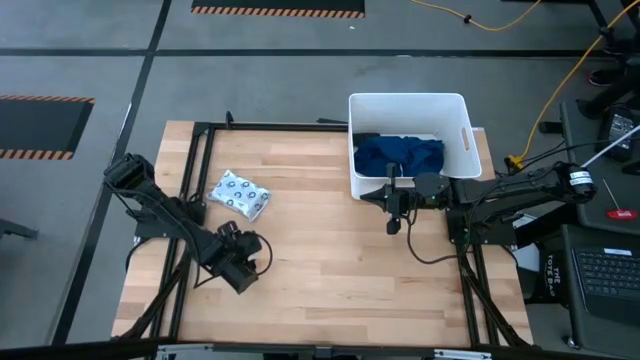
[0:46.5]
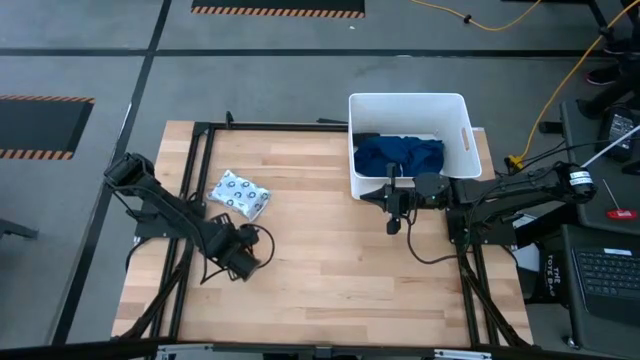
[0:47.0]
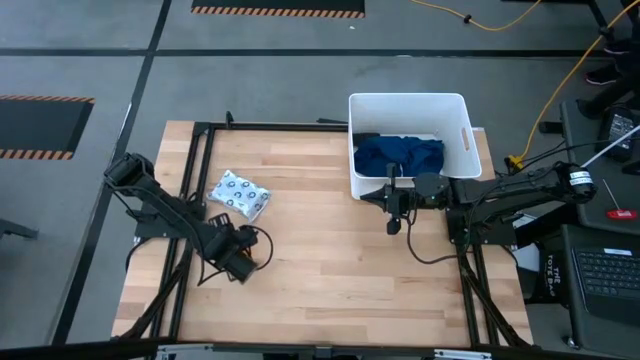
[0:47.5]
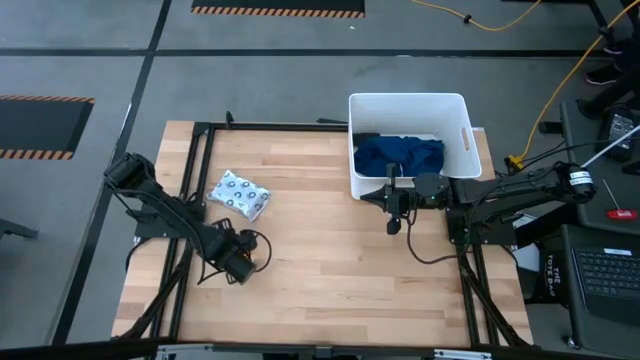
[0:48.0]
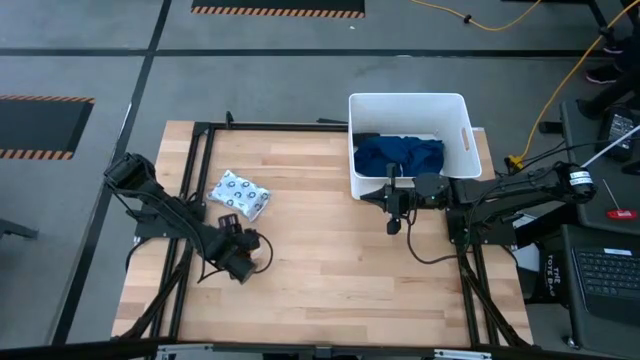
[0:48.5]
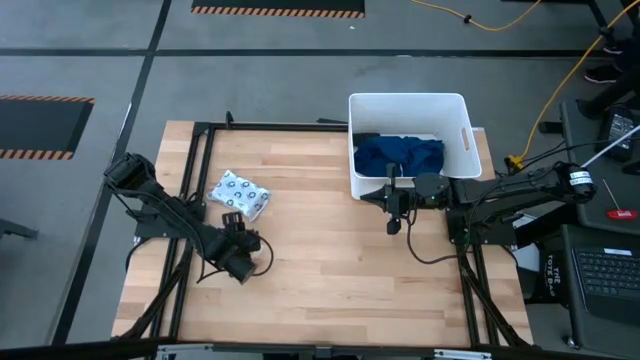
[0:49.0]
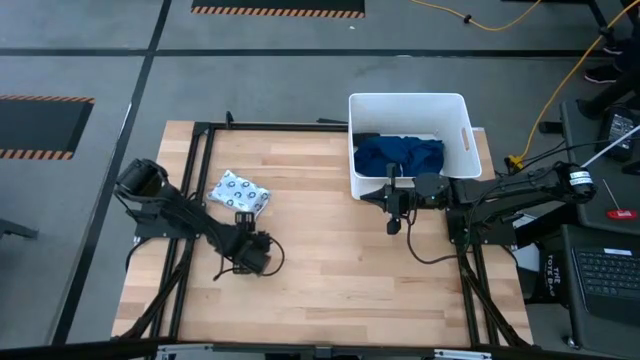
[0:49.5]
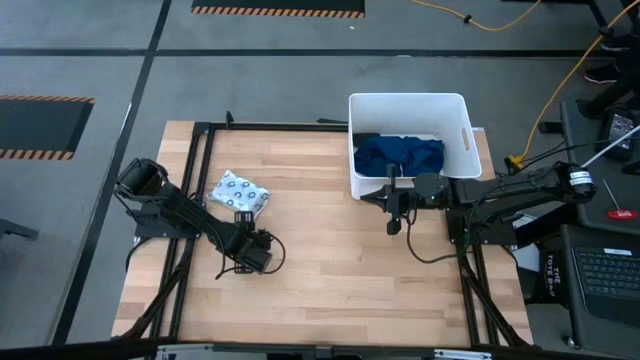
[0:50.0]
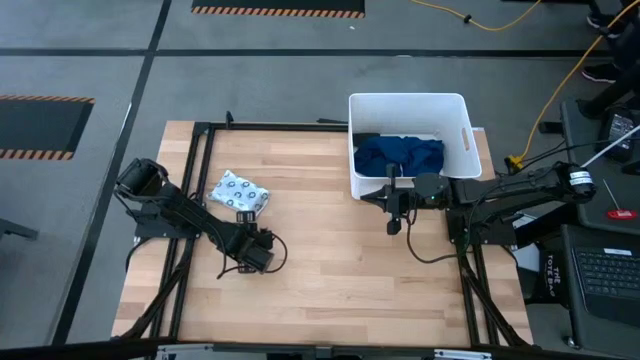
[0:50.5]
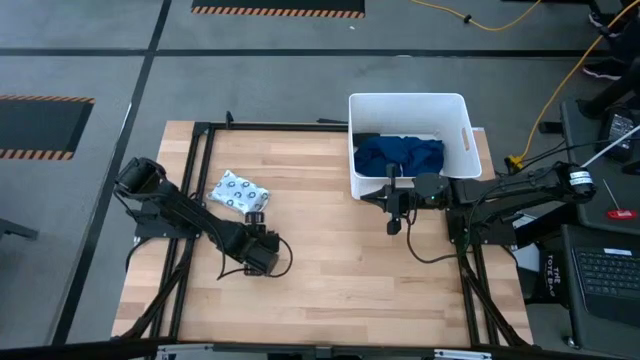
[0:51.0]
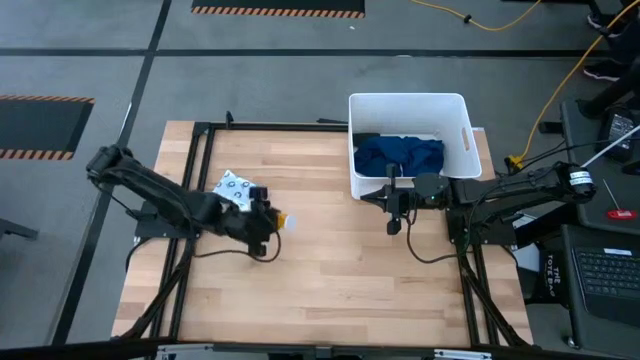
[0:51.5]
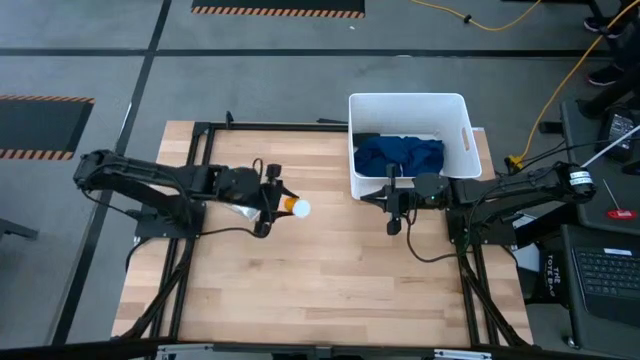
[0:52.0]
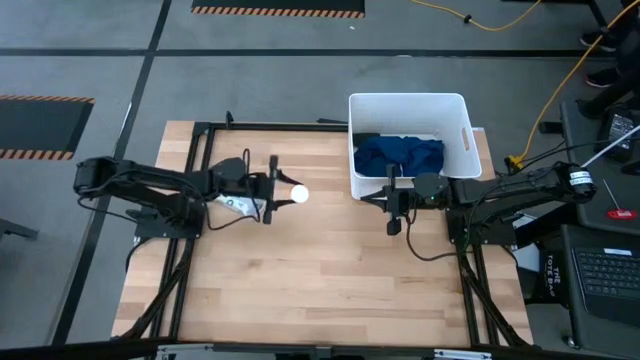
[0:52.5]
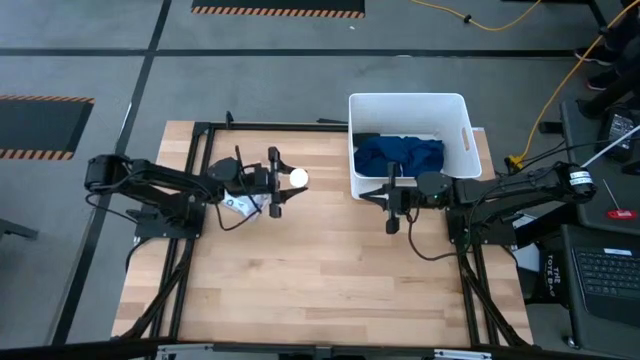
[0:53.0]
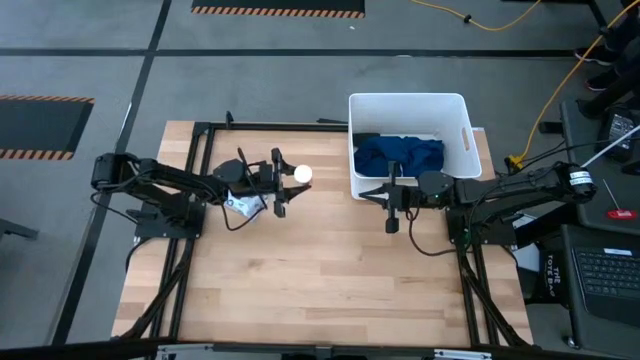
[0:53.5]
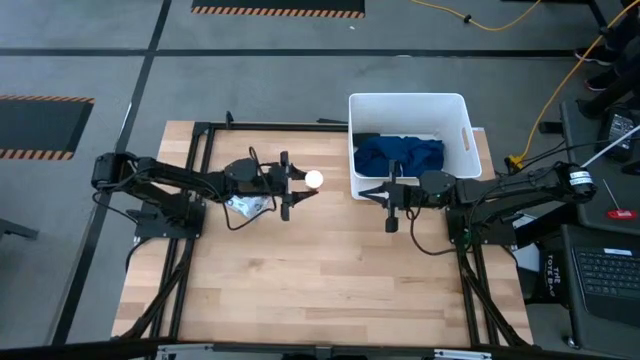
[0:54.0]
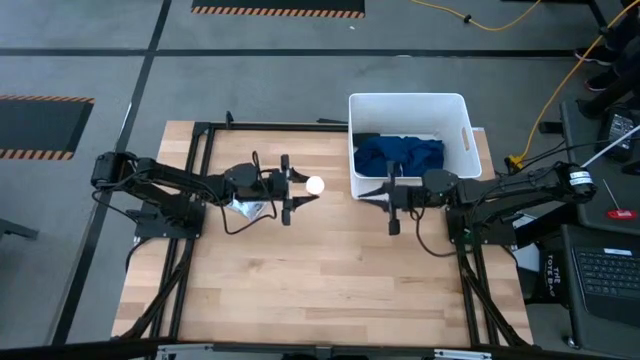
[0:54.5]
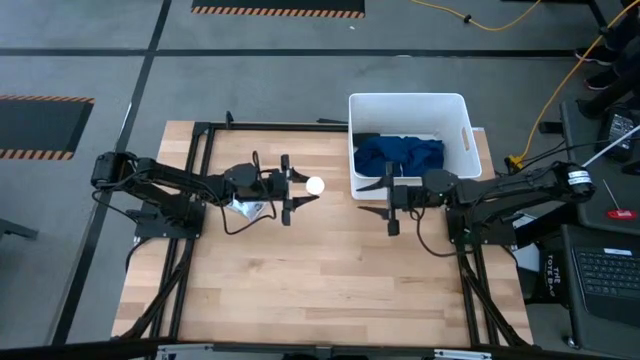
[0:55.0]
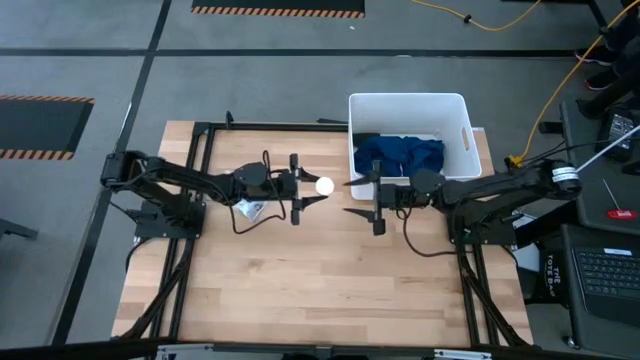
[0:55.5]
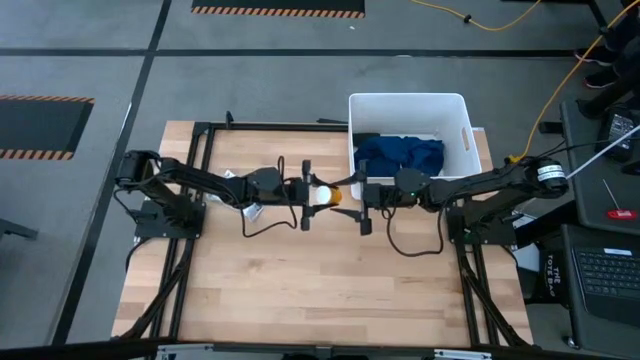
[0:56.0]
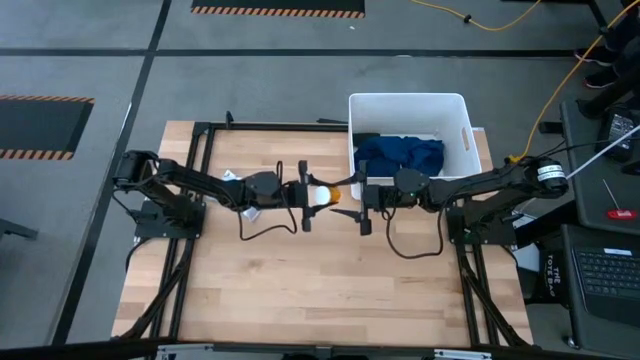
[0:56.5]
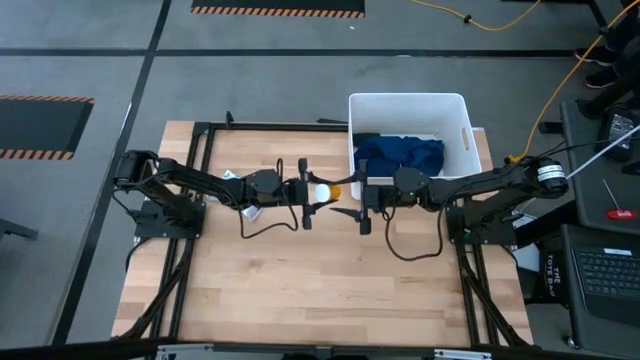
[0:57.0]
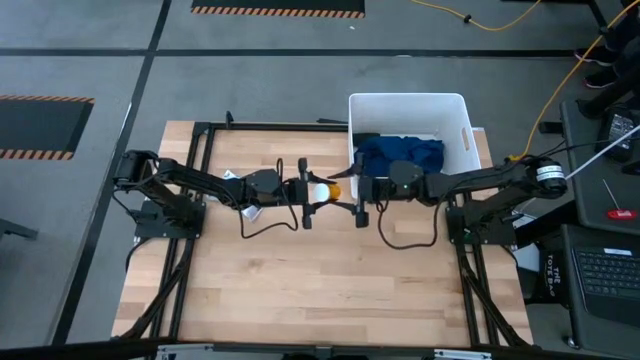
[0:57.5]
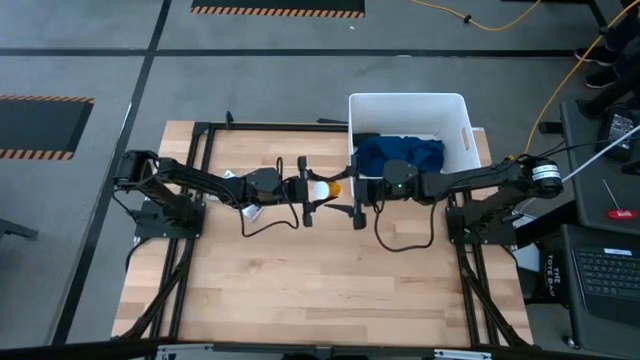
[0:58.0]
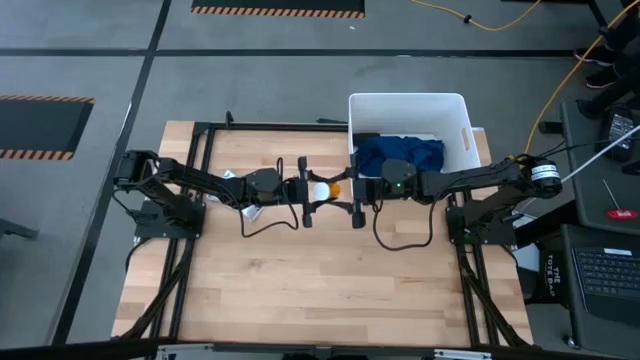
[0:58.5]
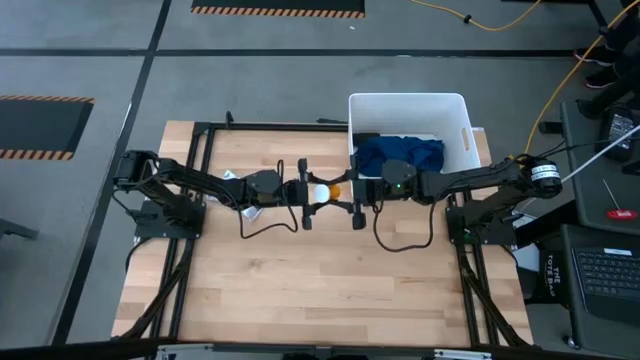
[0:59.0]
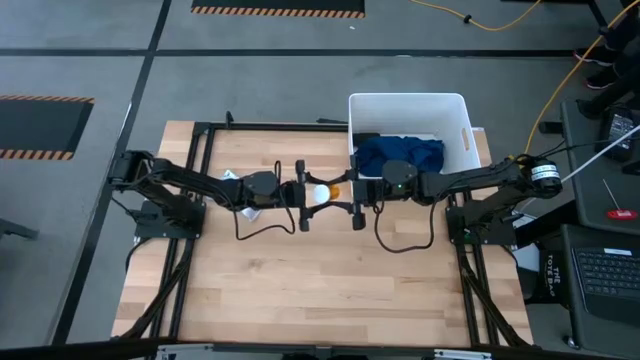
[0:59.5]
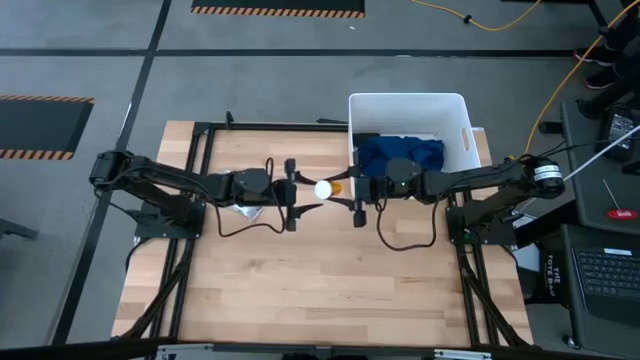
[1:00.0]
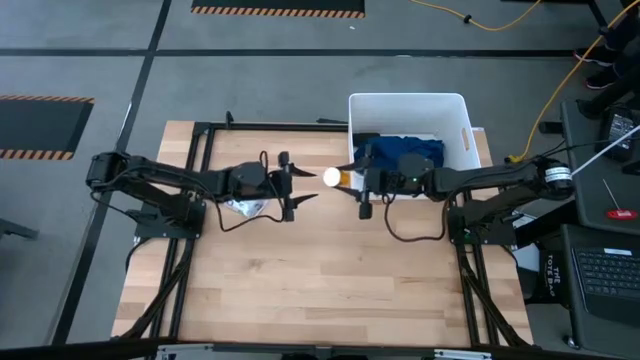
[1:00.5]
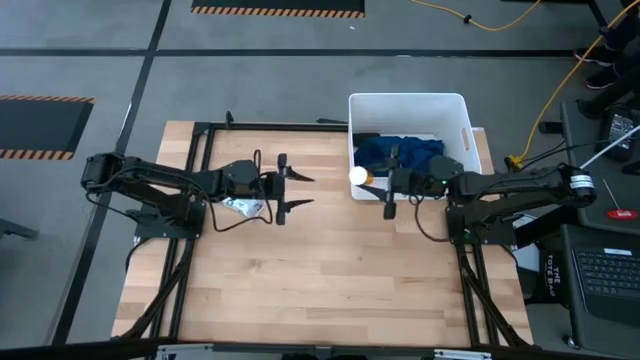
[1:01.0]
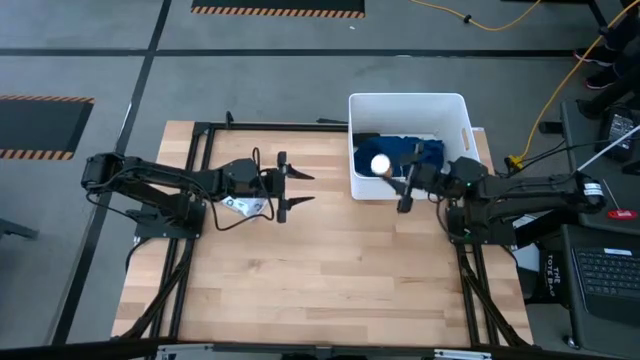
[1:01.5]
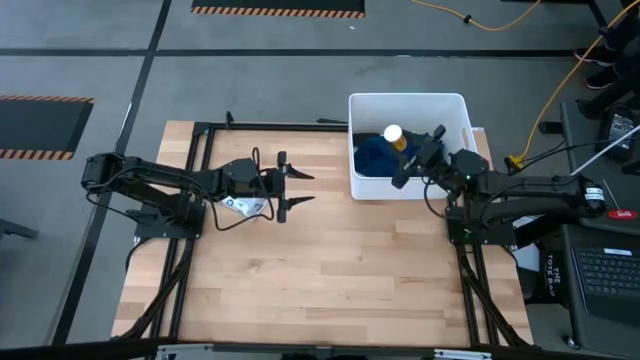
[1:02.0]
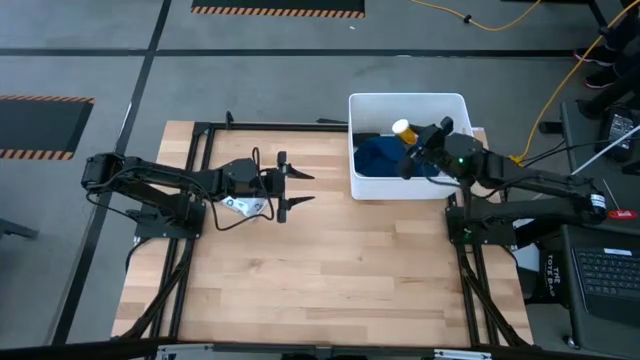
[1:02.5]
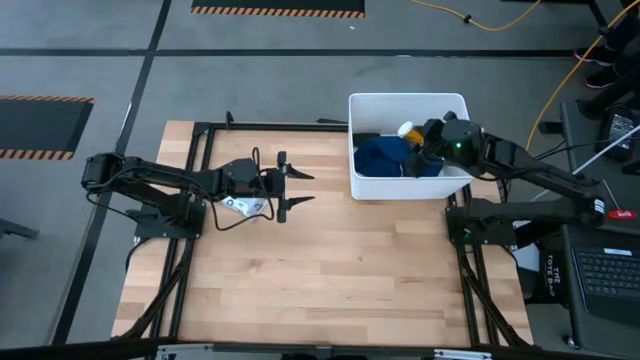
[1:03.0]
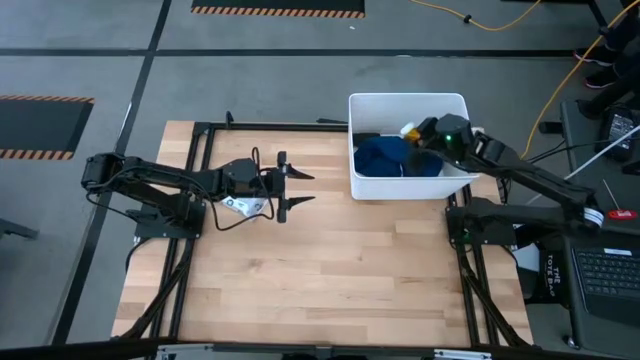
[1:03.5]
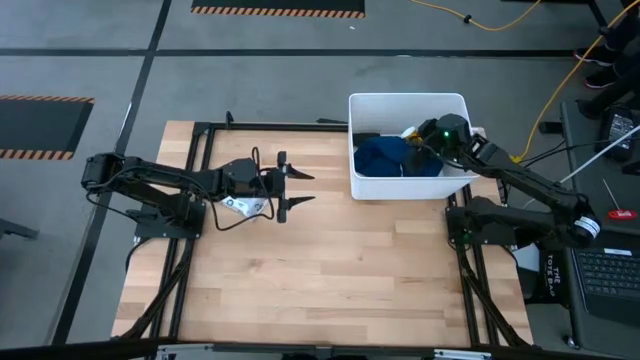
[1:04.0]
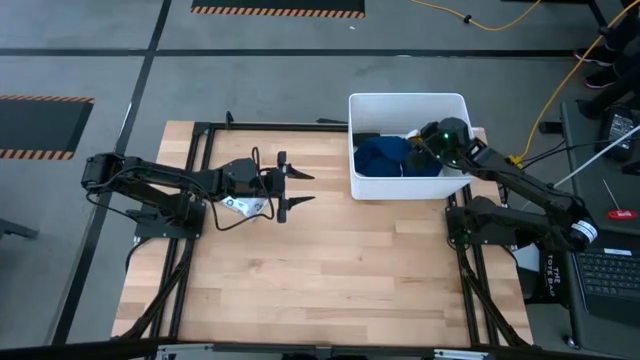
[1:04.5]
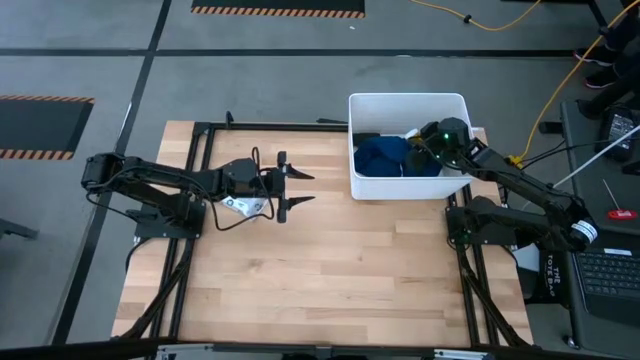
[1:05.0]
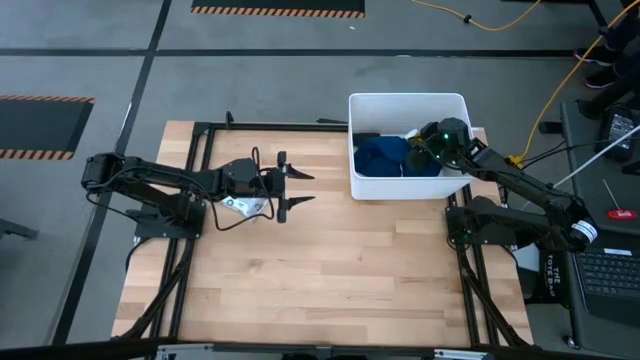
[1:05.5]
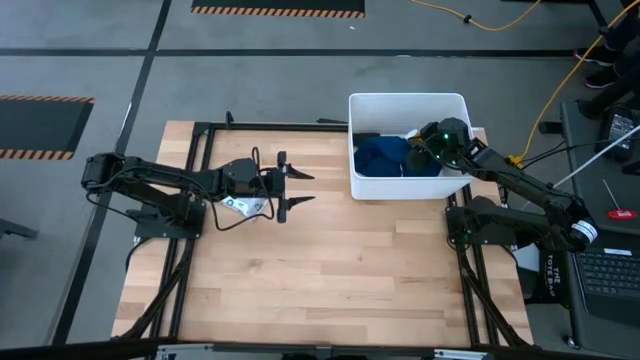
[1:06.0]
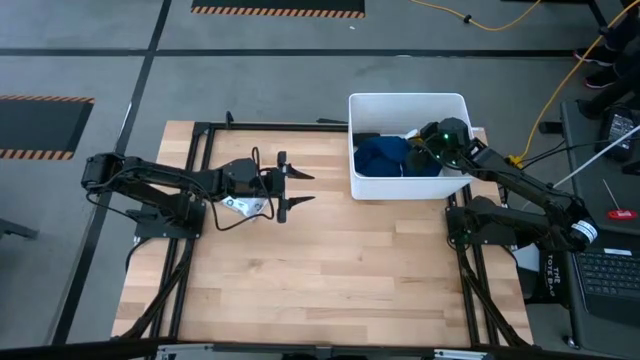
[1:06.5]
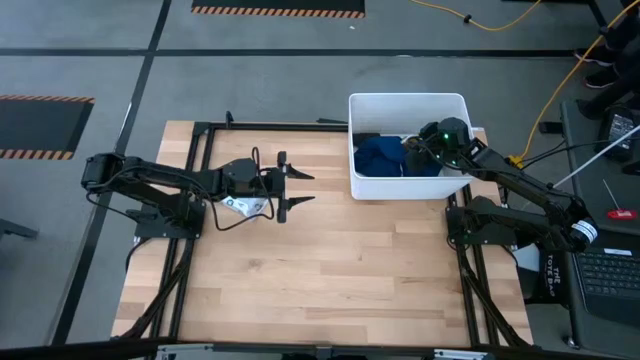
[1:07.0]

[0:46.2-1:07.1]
Task: Pick & place medical supplies in basket/bin
Put the orange pill bottle into the white container
